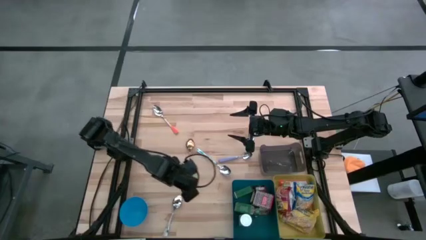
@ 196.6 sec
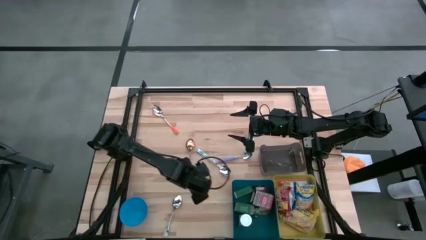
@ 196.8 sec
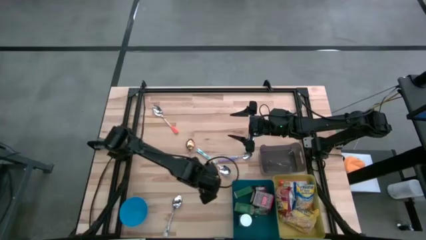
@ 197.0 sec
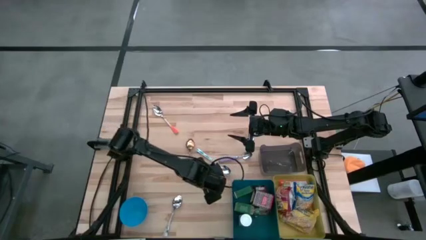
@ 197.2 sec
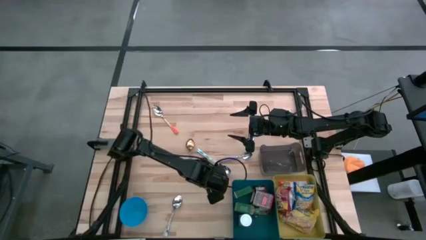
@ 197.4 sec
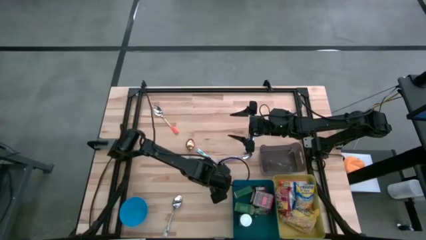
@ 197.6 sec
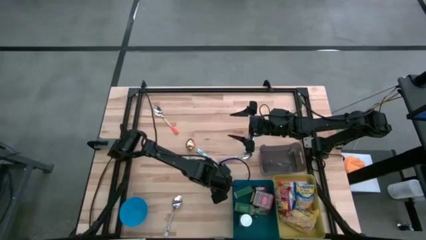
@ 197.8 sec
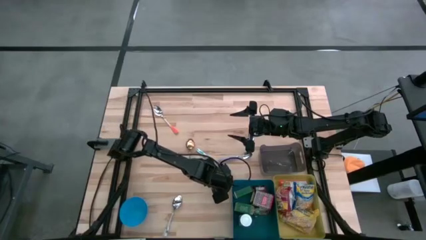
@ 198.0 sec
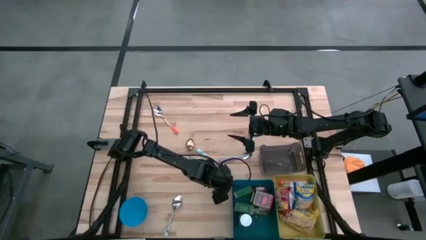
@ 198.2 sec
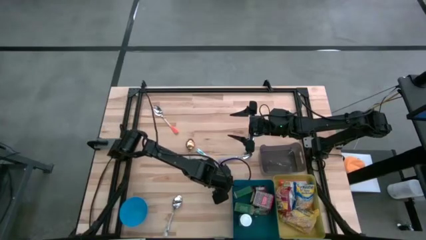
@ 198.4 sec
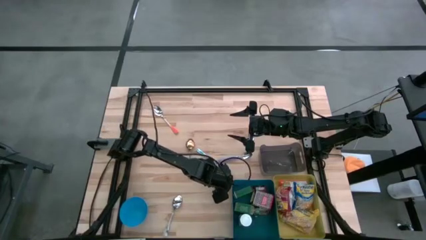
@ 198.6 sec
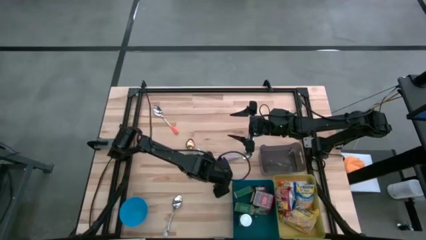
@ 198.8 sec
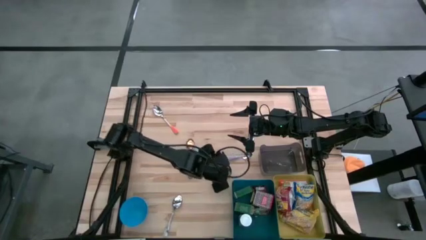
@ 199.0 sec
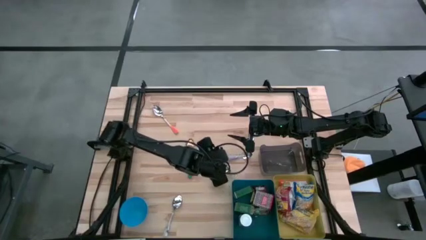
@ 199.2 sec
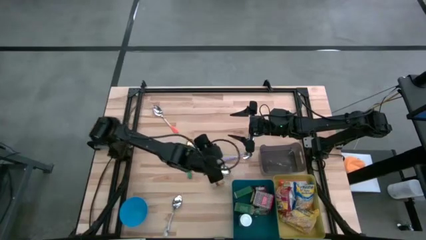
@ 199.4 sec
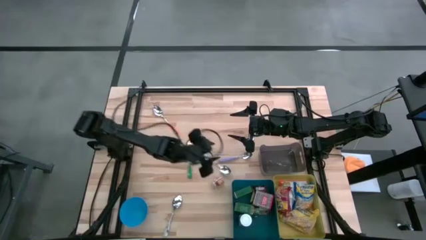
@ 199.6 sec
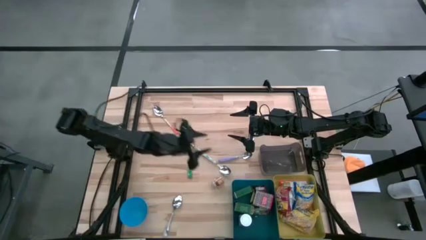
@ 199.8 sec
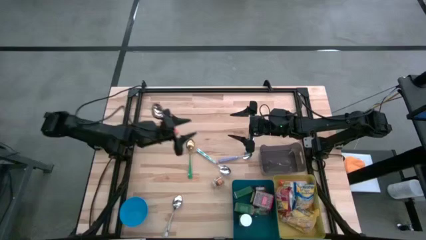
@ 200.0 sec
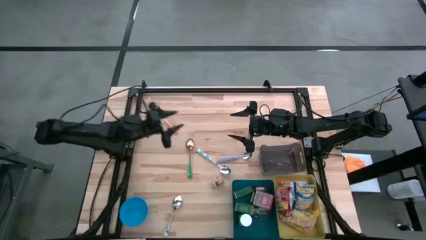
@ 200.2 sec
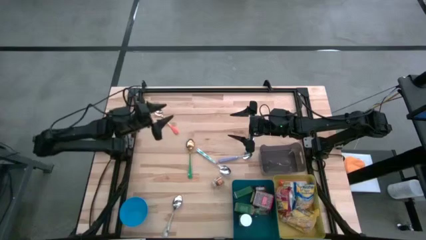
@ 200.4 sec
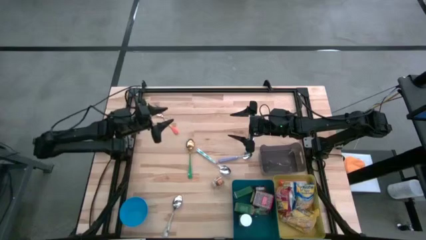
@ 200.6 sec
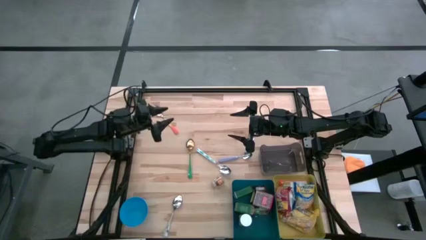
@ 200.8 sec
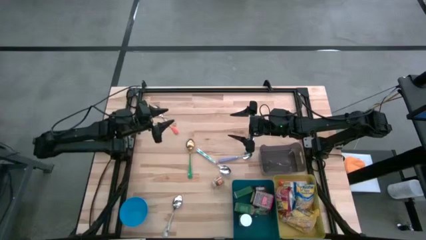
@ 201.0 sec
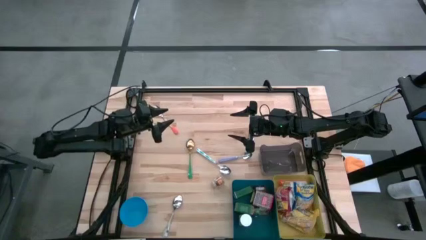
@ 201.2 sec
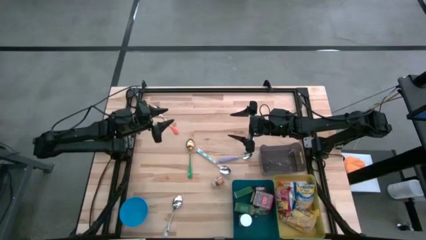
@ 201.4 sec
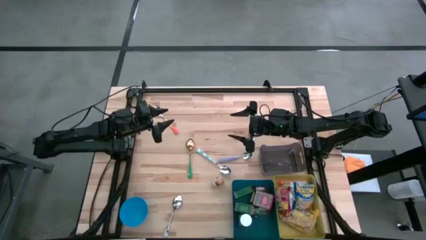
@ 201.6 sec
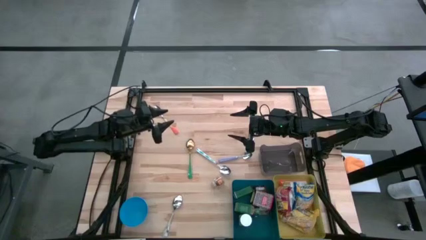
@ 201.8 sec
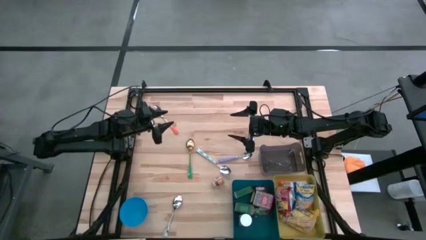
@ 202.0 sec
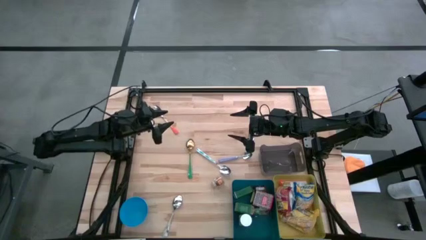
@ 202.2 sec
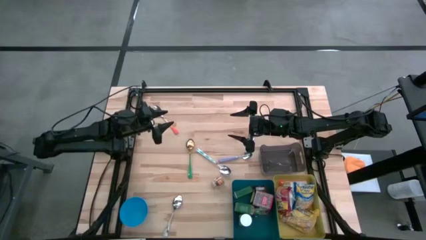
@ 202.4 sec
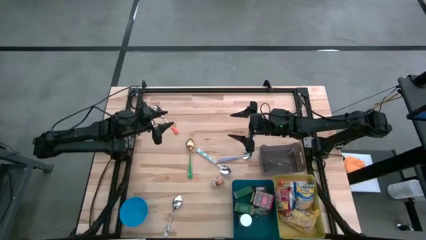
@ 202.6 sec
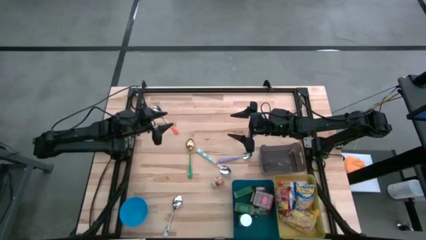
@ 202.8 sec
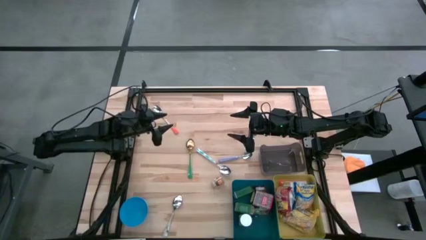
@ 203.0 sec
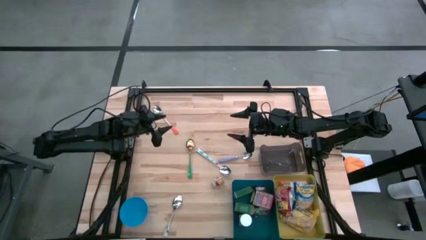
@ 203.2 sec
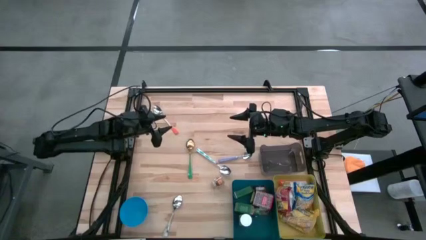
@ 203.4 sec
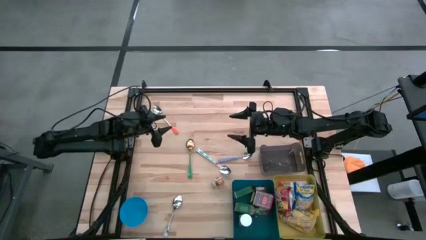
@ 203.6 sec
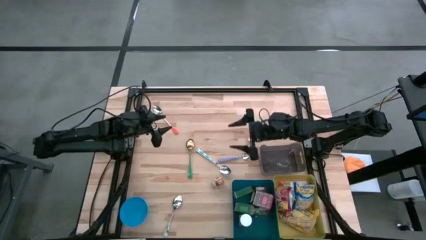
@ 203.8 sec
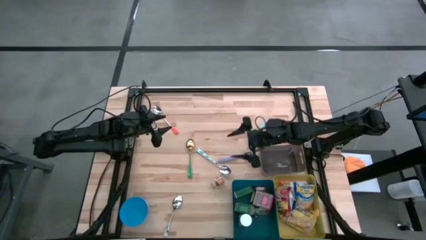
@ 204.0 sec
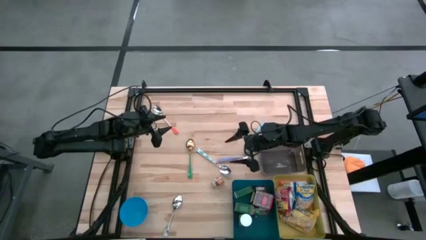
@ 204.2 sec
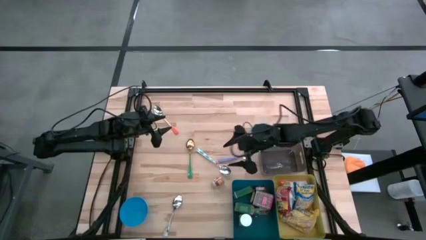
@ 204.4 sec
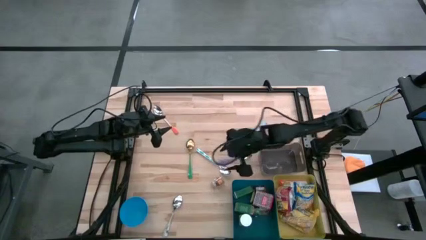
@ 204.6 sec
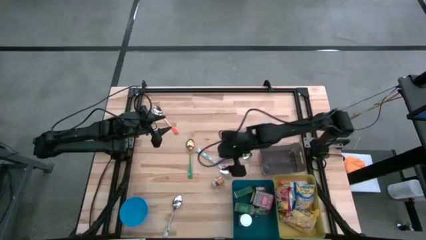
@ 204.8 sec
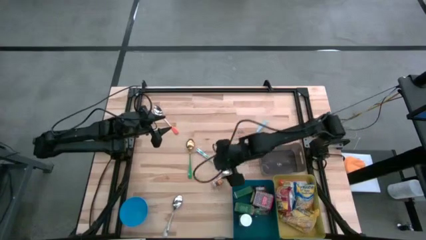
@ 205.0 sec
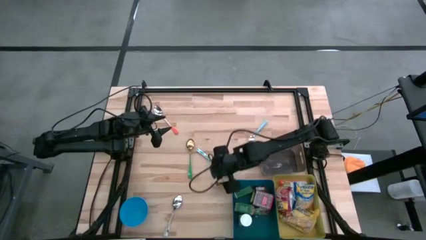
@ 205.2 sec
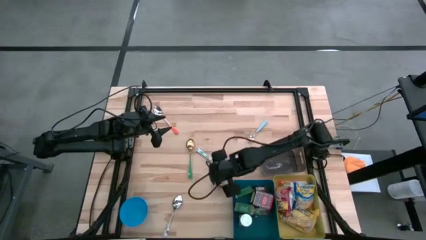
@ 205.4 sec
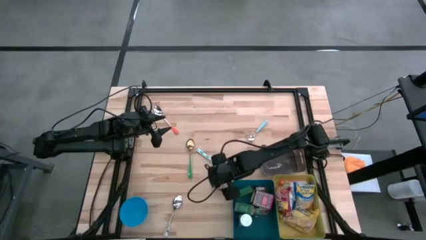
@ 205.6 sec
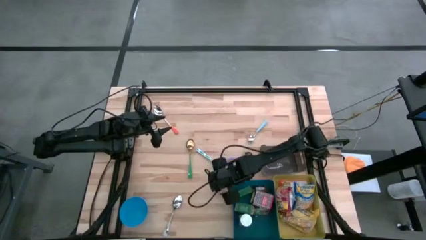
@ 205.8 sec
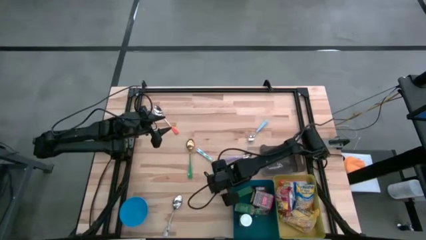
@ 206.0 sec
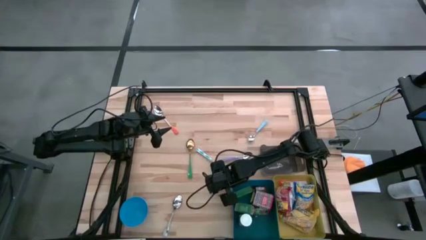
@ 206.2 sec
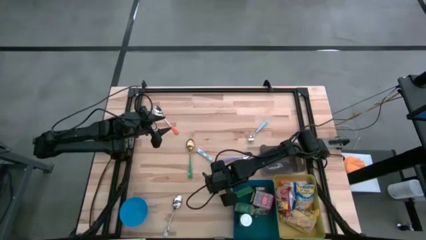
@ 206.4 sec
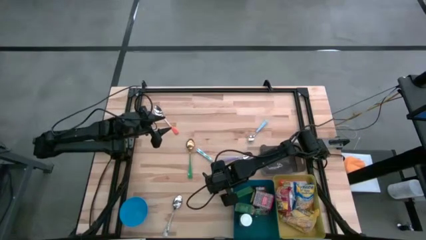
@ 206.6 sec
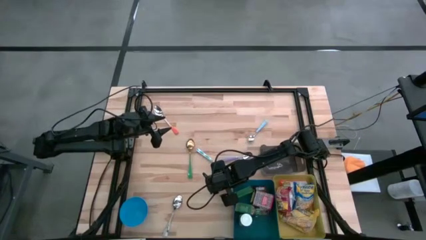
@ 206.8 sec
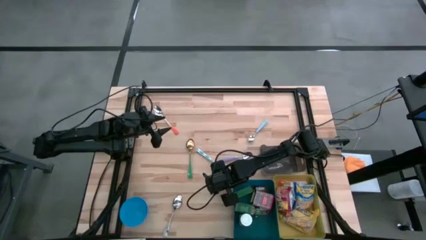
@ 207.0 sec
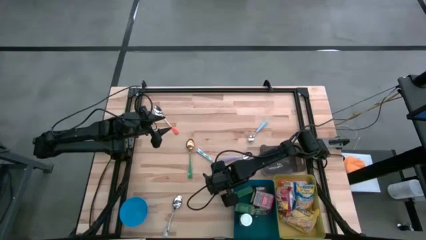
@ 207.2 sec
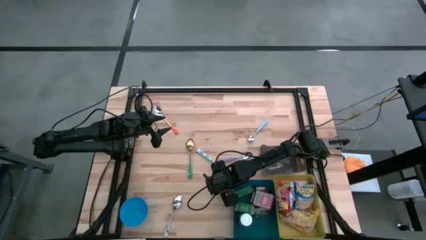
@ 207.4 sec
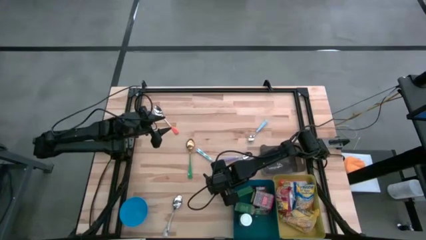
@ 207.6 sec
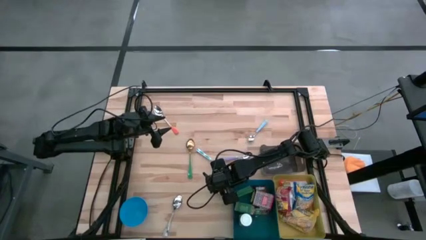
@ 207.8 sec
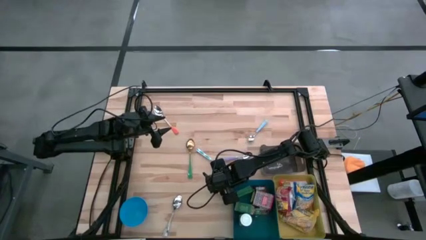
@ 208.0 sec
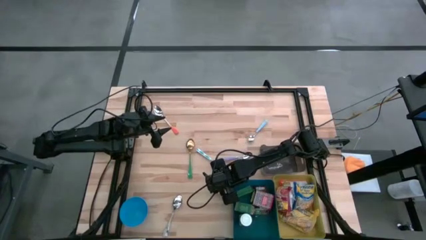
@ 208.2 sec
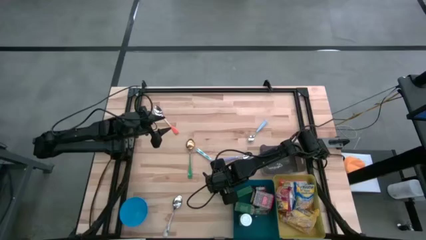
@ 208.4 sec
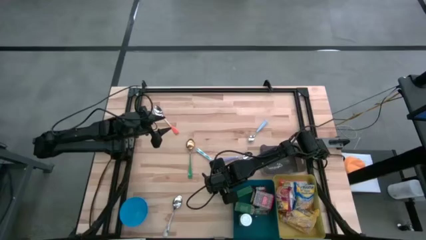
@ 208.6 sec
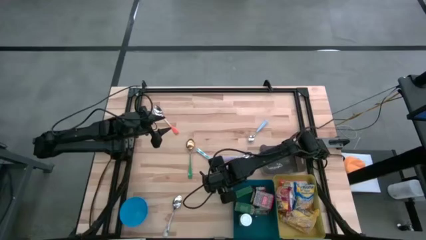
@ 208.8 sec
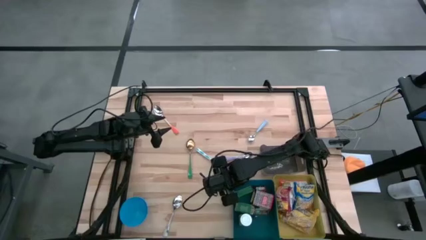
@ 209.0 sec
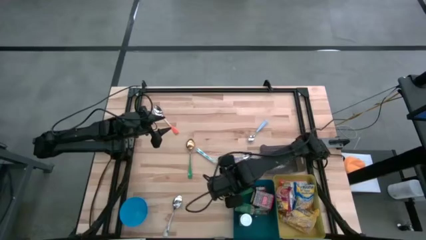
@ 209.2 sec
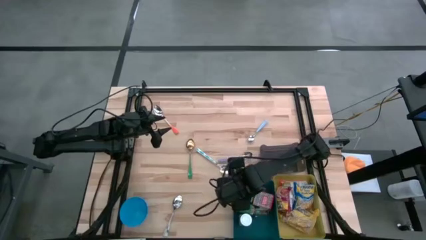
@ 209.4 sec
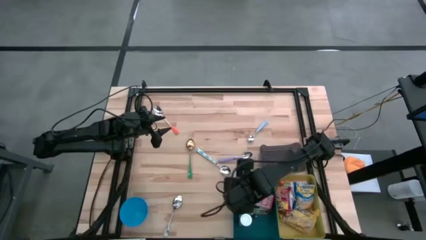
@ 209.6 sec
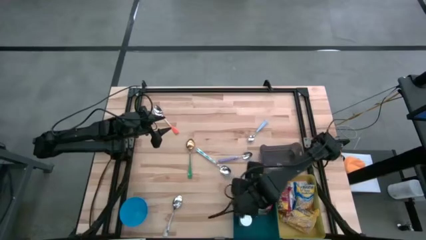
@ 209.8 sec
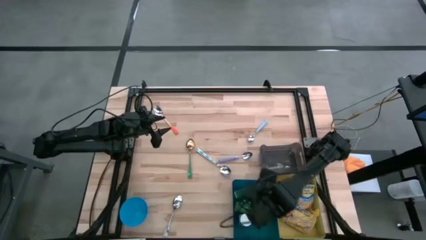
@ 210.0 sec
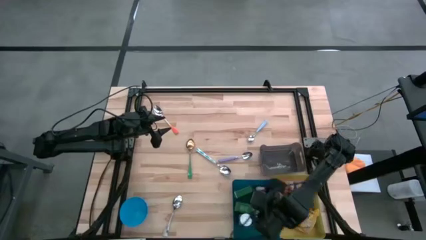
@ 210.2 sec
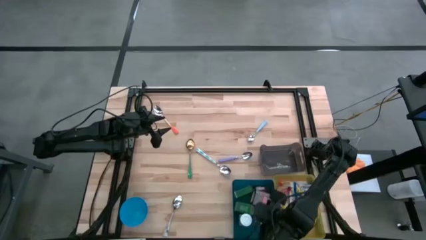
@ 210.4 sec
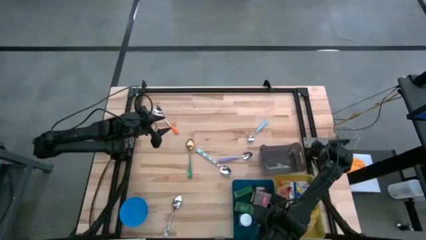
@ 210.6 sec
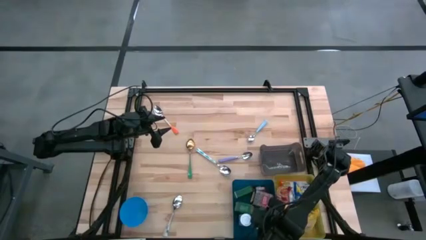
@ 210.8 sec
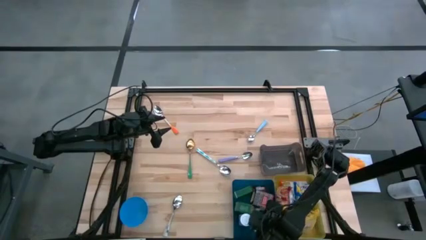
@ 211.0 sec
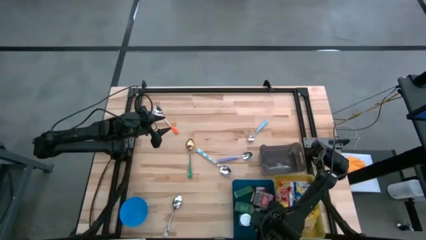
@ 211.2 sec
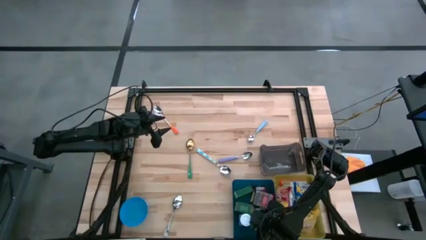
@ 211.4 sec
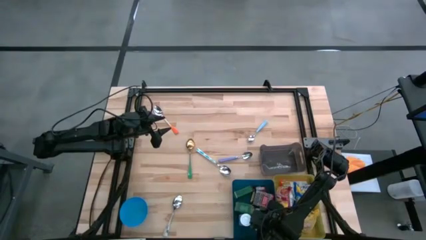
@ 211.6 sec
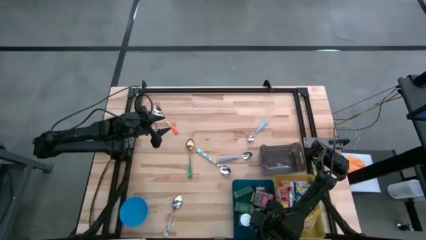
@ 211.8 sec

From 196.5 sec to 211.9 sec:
Put the brown seasoning bottle into the blue bin
